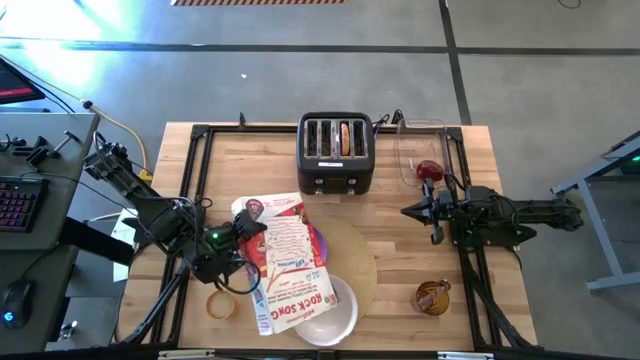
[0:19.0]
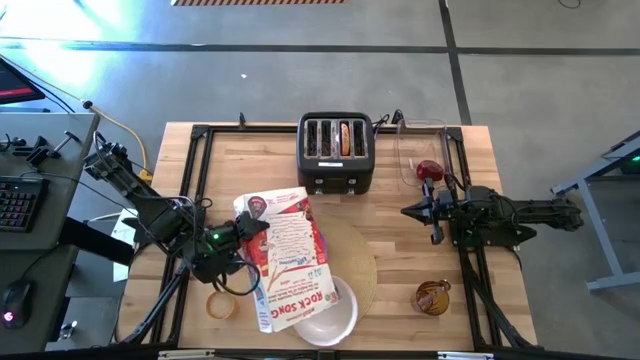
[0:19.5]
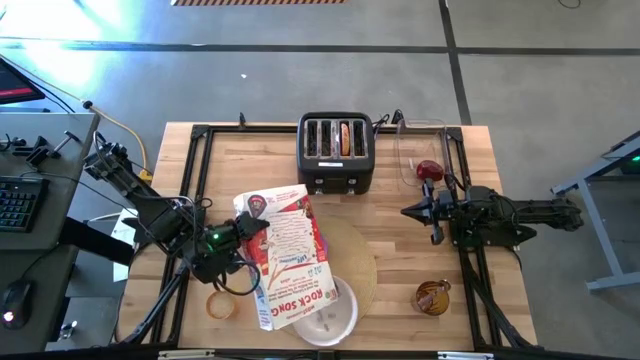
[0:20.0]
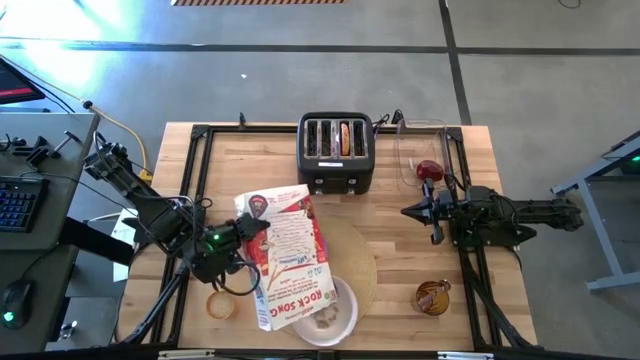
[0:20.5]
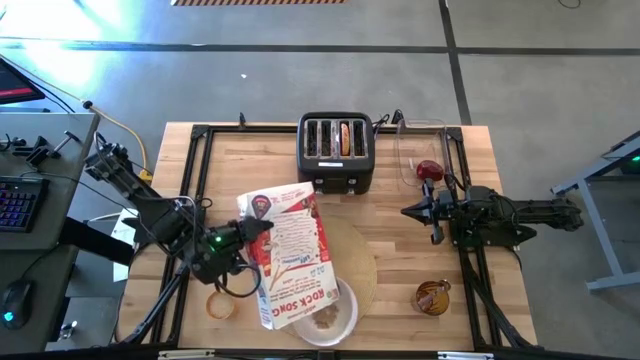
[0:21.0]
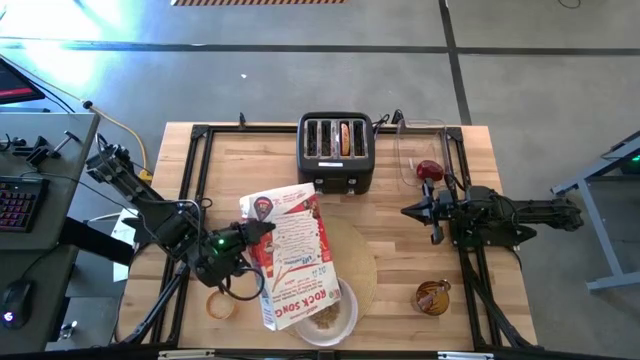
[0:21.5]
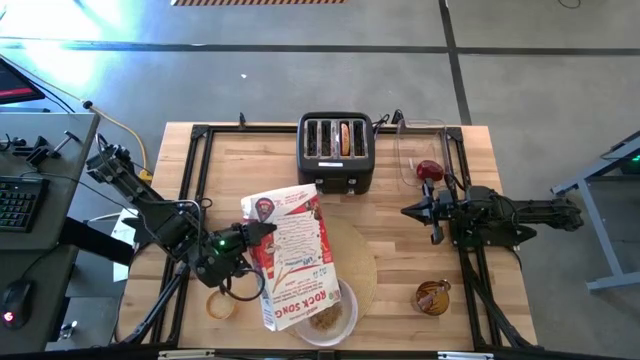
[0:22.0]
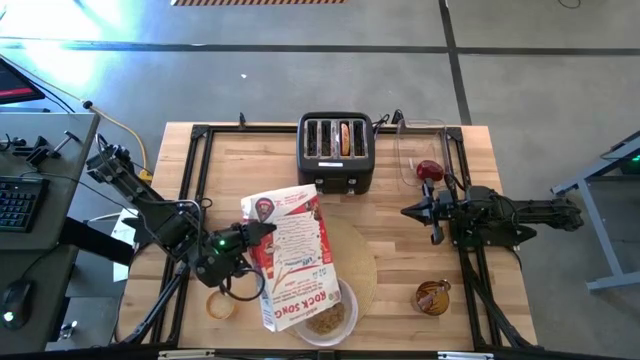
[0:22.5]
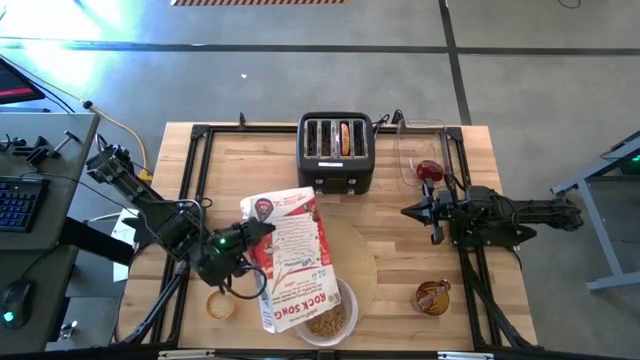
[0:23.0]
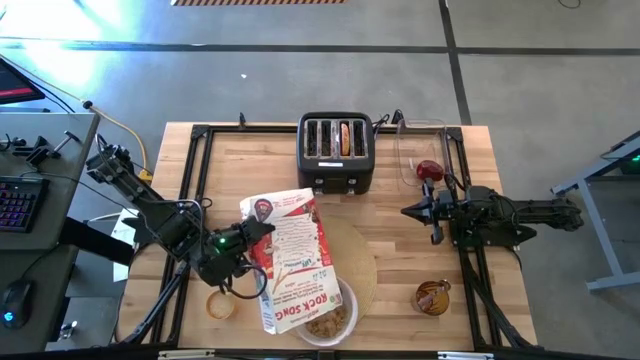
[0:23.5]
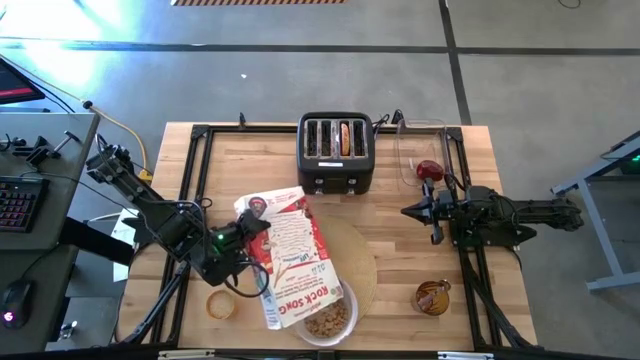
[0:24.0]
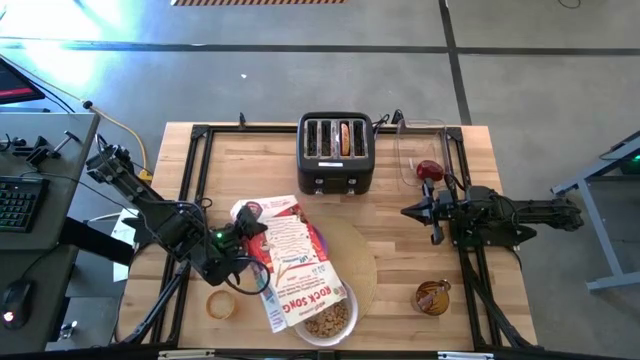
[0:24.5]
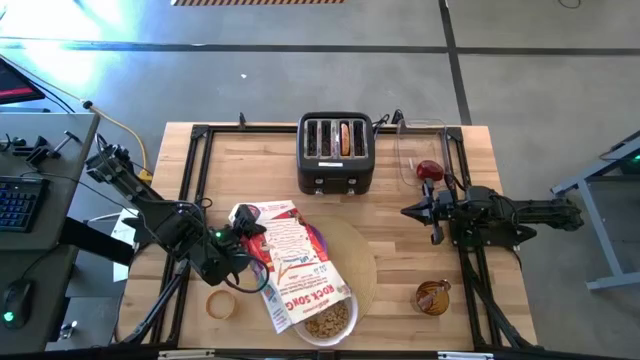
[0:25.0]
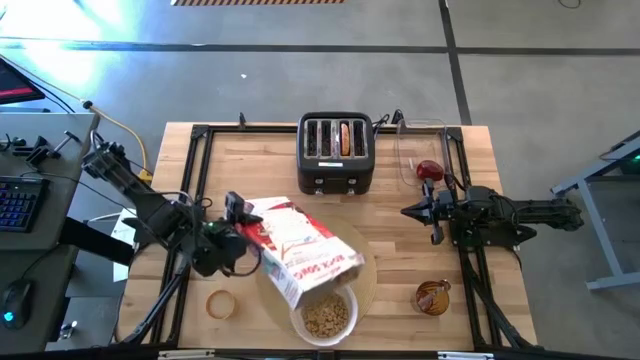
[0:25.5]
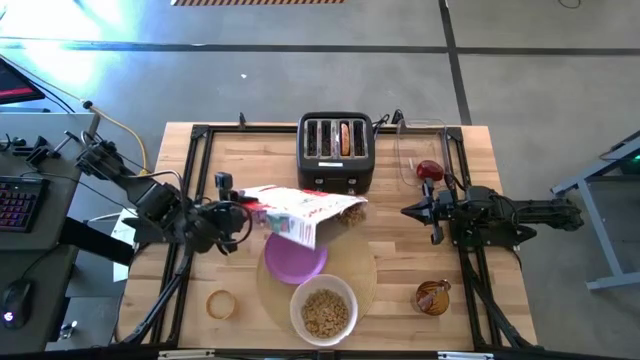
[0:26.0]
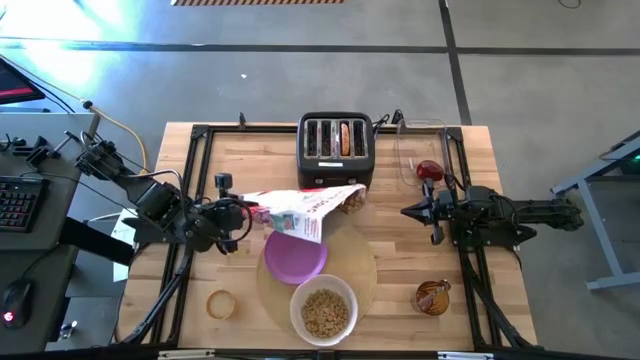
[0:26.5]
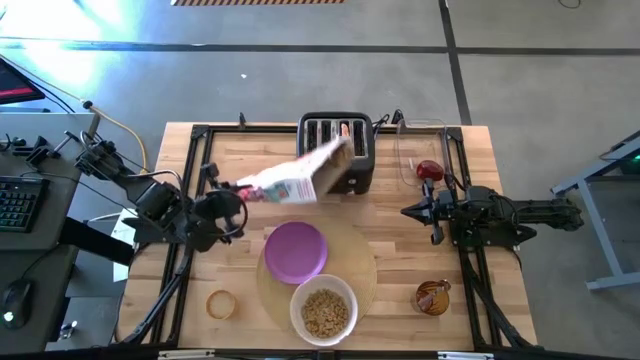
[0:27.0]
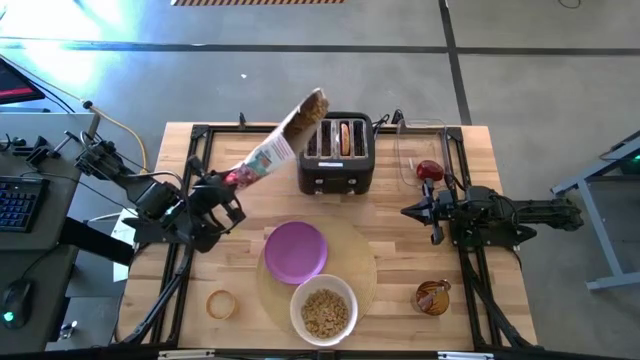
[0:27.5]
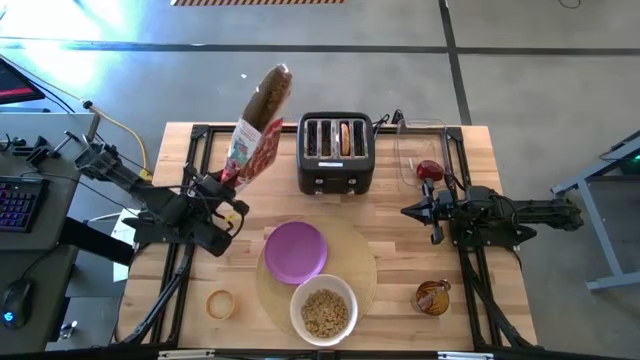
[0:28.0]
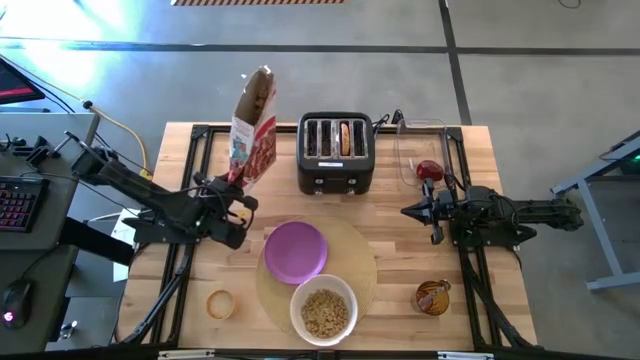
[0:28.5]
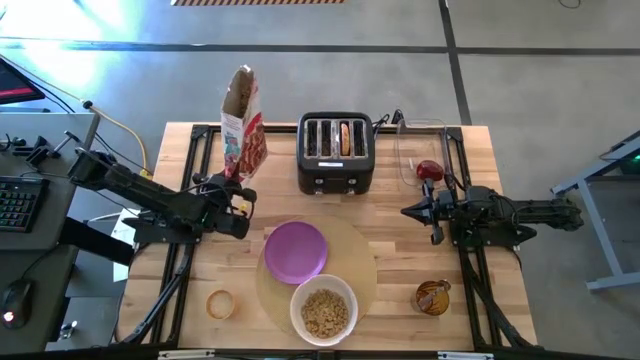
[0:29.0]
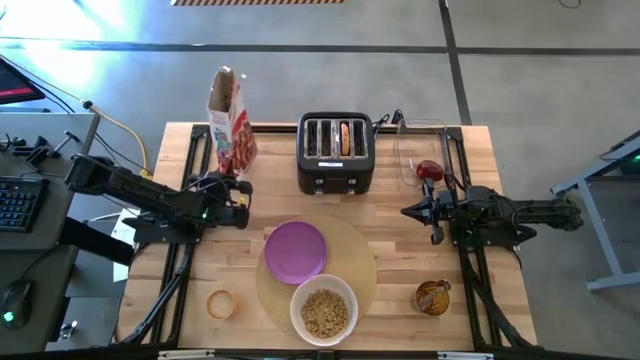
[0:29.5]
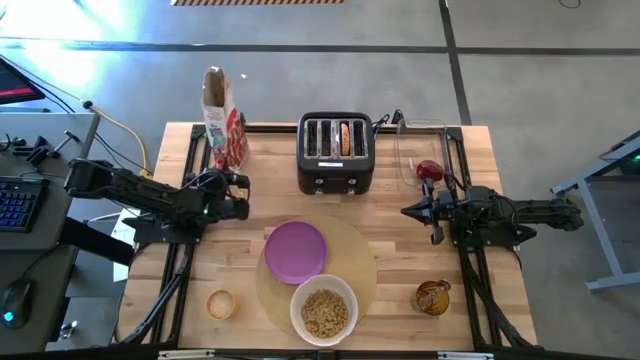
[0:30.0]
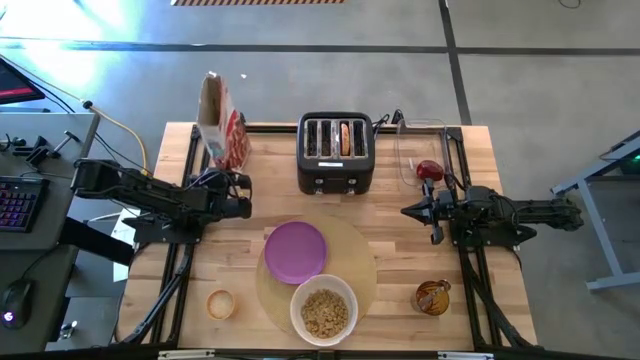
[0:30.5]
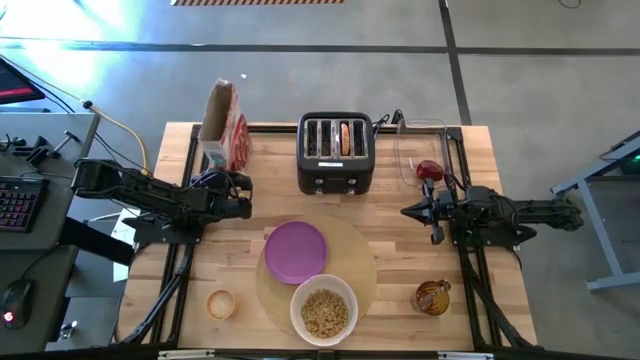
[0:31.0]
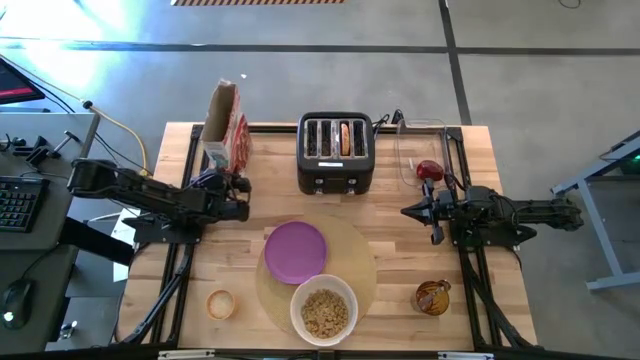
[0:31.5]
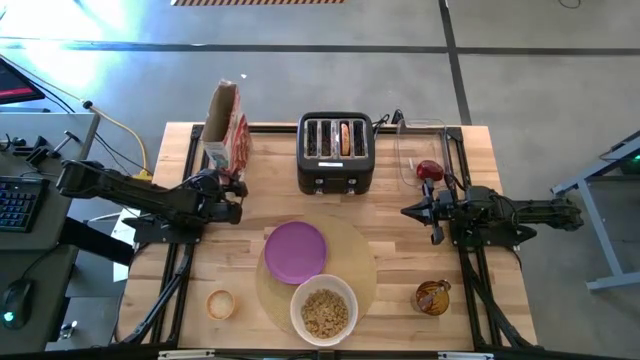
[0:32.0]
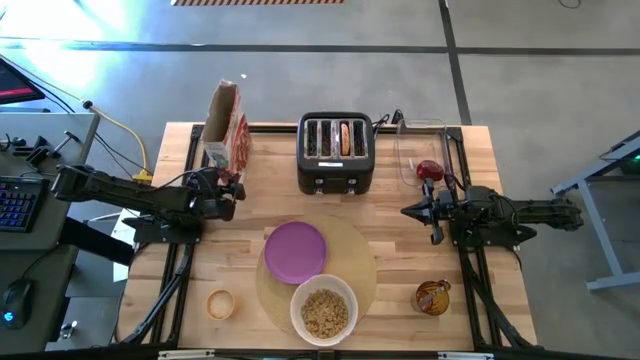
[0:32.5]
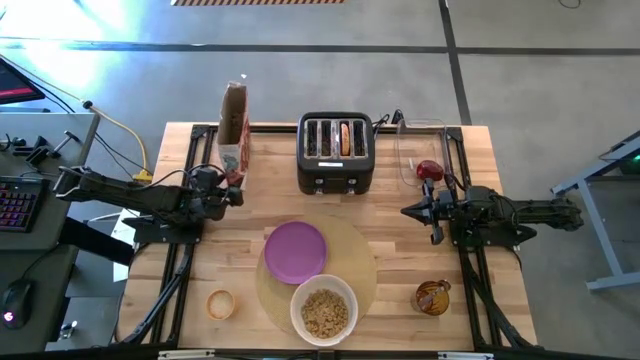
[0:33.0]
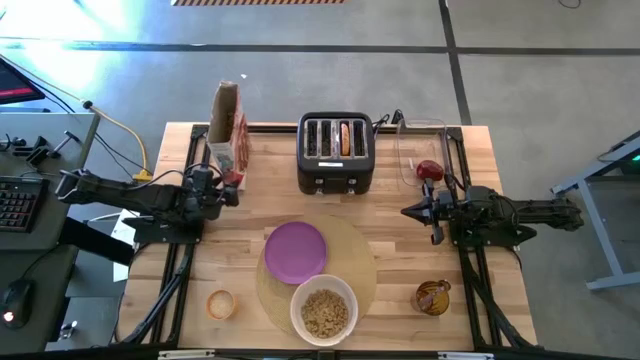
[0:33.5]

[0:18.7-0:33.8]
Task: Arrange a breakfast setting
Pour the cereal from the white cereal box into the white bowl

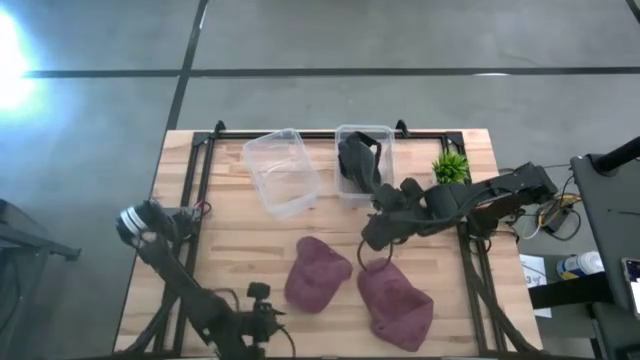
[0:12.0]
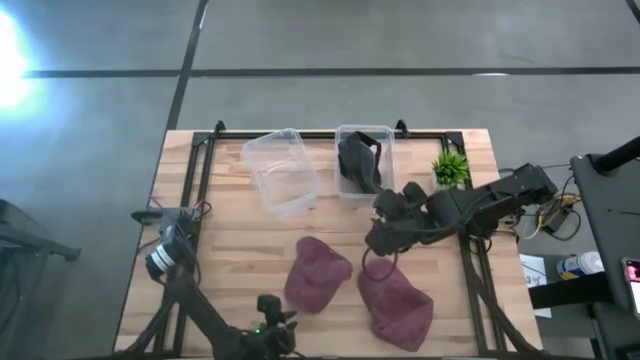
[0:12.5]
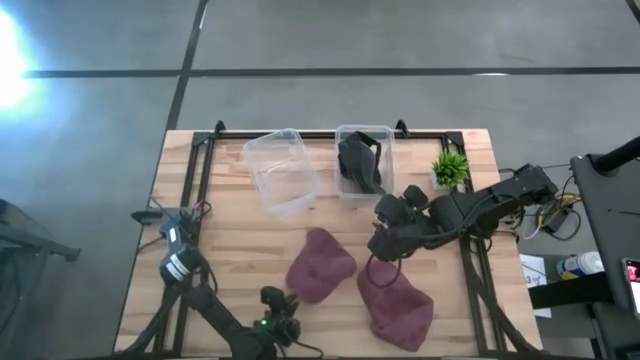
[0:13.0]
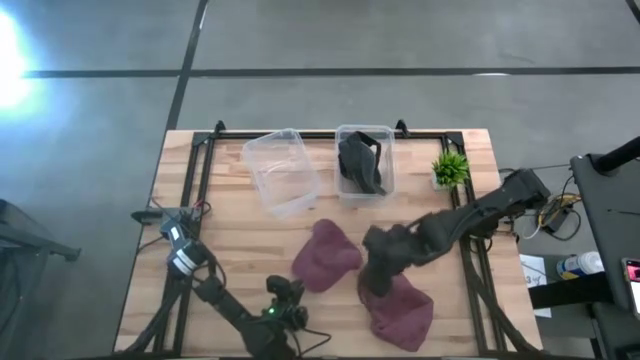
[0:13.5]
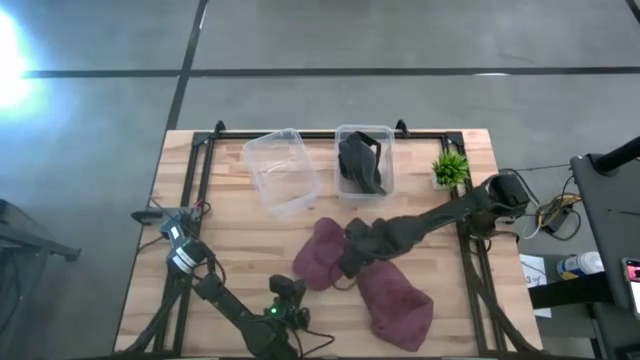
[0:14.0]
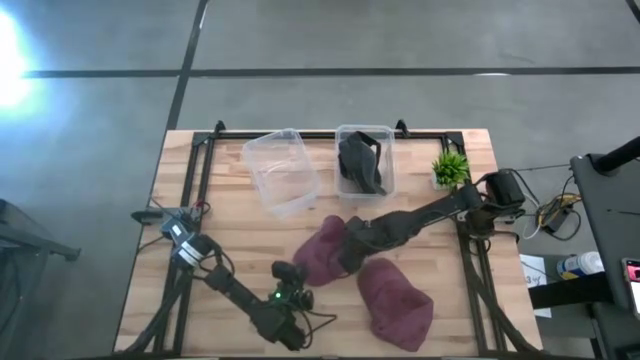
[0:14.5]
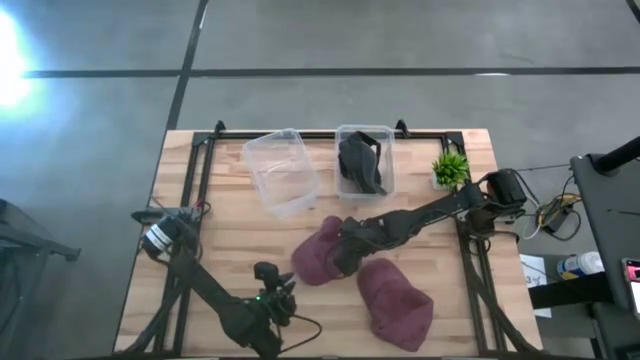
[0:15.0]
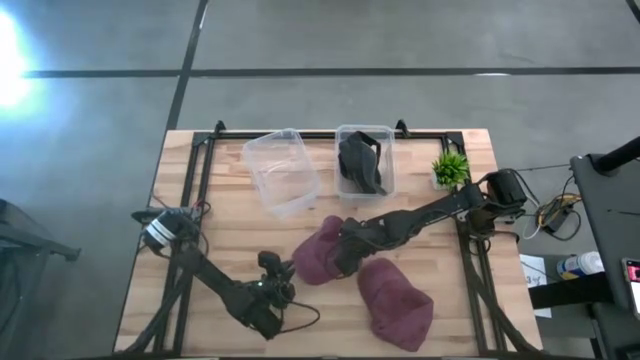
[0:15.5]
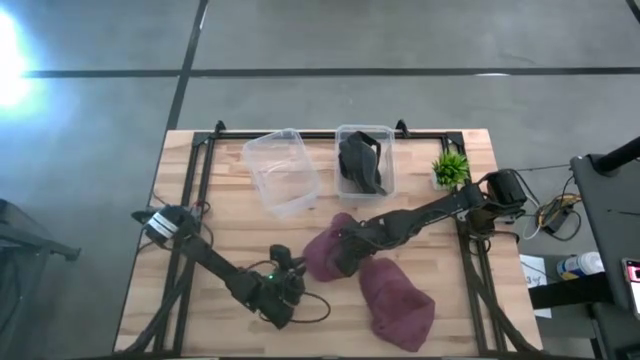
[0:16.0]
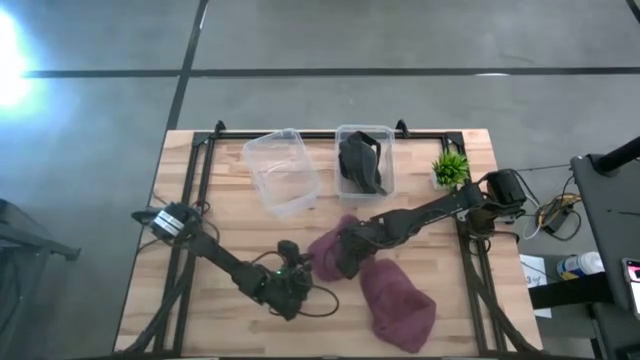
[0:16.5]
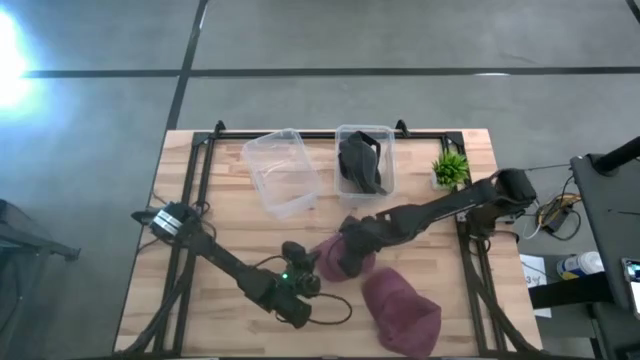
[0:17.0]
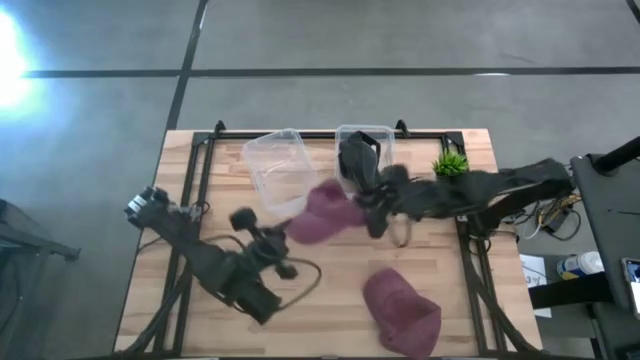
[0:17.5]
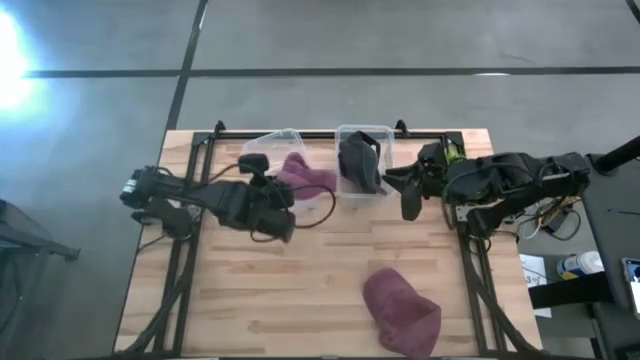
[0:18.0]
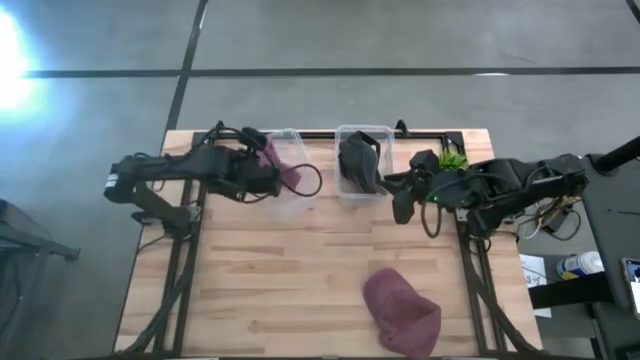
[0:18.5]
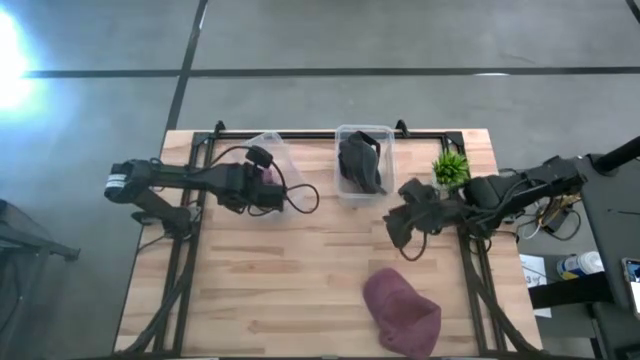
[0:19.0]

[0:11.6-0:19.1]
Task: Pick & Place hat
Put the top red cap into the left transparent bin
